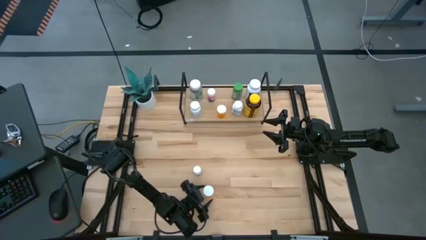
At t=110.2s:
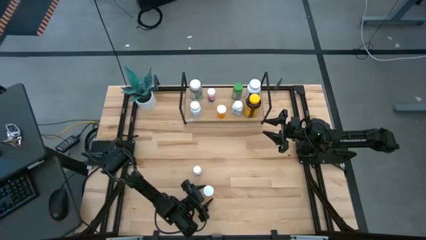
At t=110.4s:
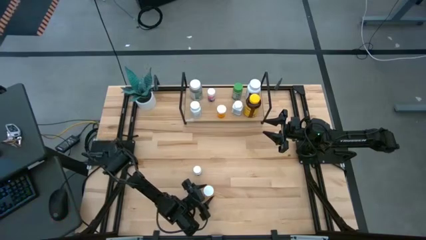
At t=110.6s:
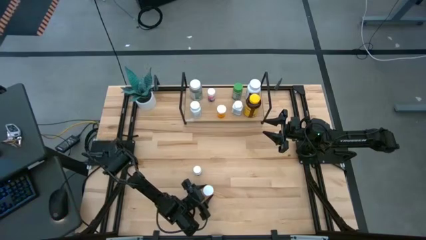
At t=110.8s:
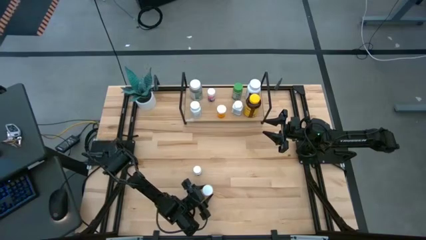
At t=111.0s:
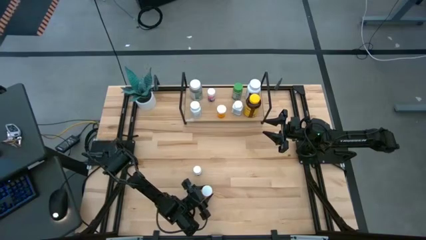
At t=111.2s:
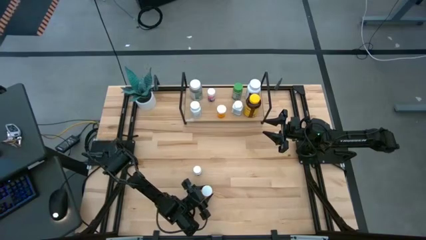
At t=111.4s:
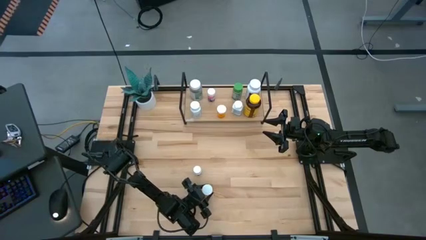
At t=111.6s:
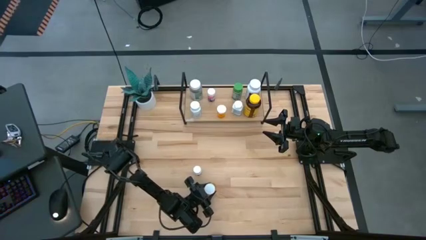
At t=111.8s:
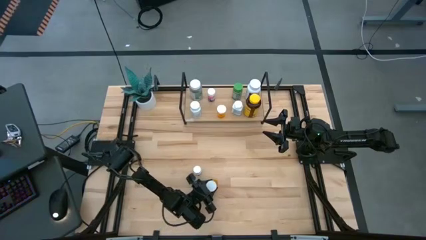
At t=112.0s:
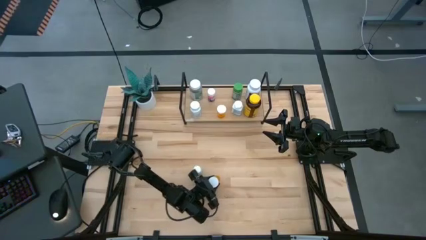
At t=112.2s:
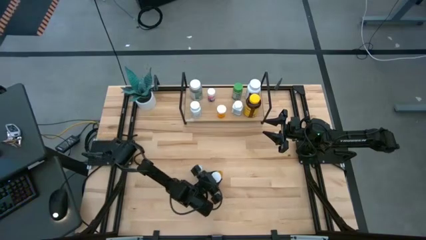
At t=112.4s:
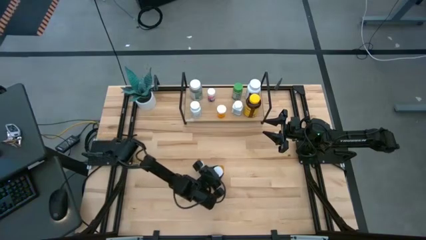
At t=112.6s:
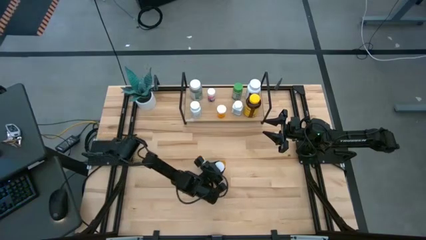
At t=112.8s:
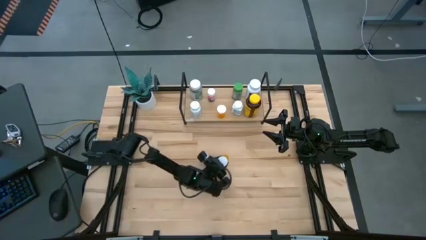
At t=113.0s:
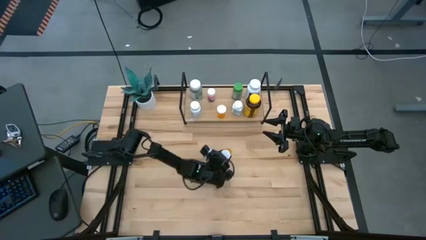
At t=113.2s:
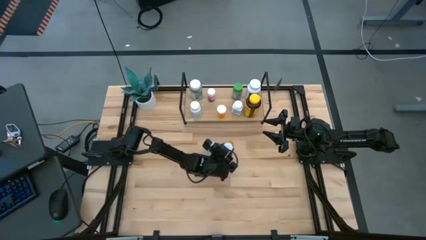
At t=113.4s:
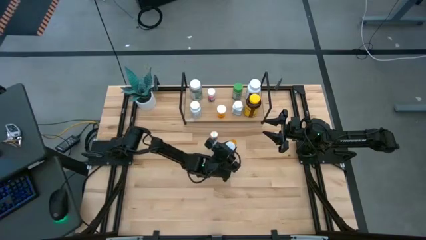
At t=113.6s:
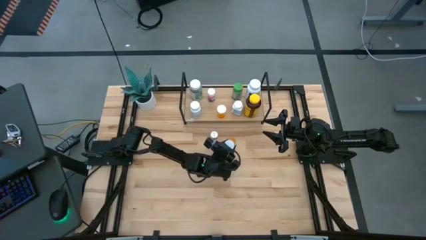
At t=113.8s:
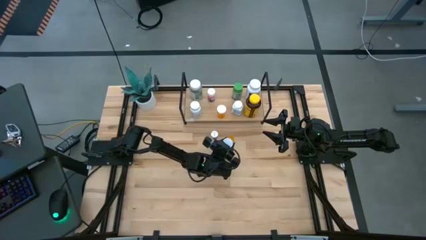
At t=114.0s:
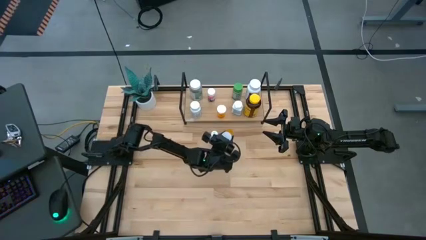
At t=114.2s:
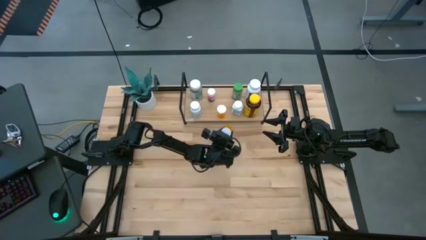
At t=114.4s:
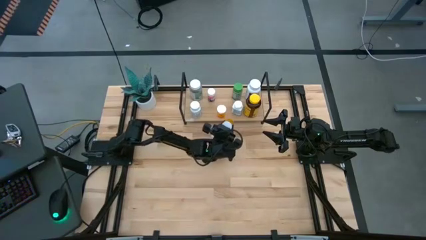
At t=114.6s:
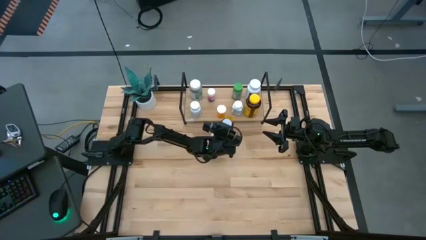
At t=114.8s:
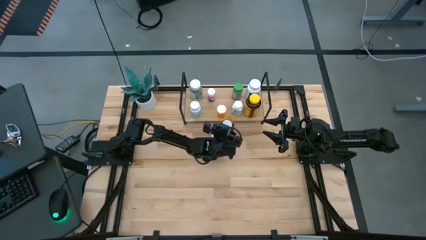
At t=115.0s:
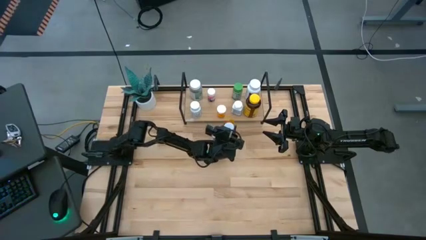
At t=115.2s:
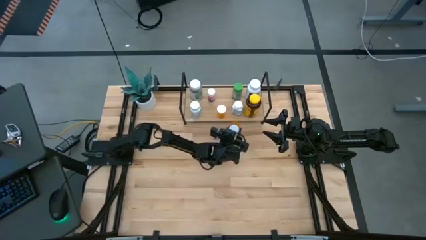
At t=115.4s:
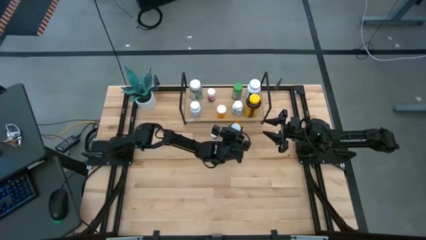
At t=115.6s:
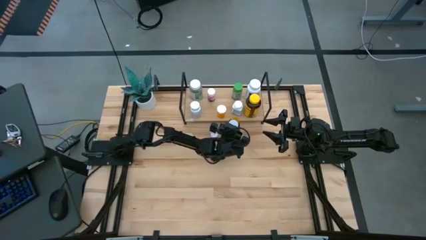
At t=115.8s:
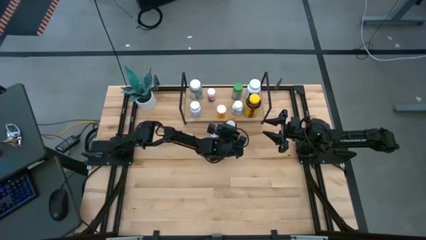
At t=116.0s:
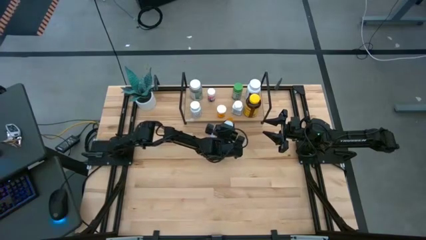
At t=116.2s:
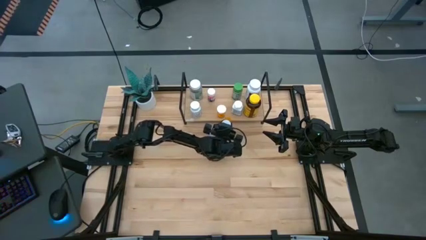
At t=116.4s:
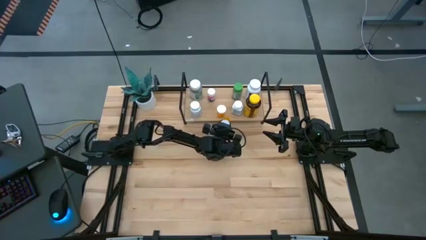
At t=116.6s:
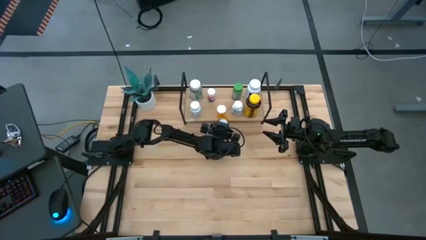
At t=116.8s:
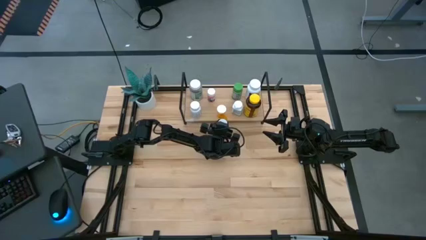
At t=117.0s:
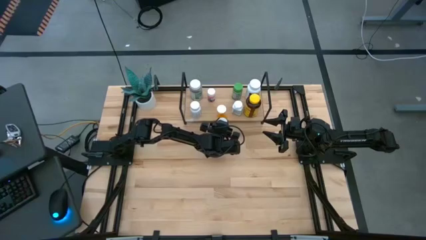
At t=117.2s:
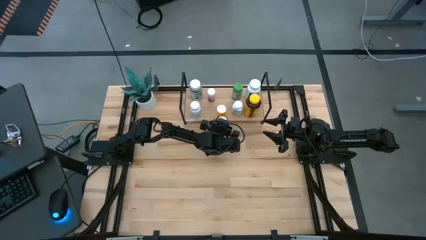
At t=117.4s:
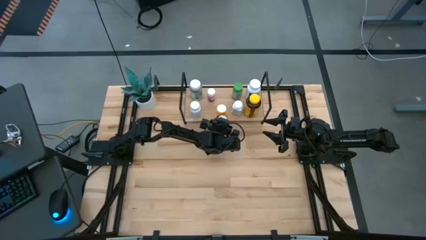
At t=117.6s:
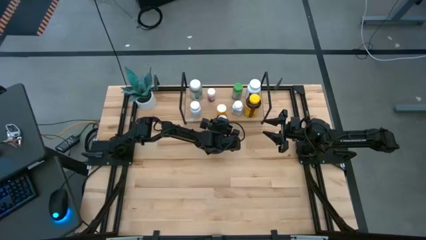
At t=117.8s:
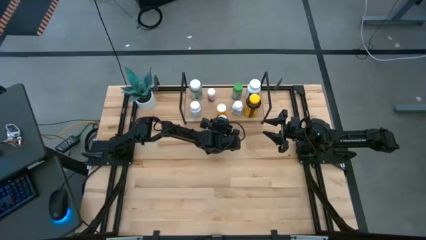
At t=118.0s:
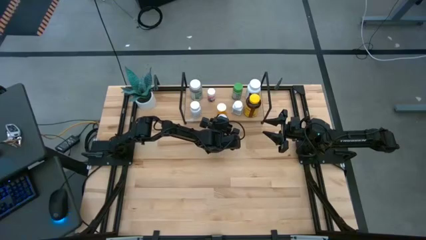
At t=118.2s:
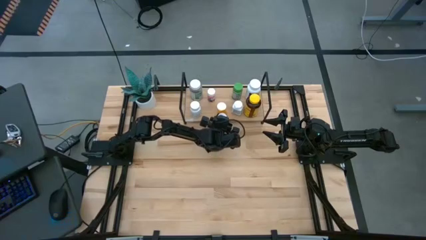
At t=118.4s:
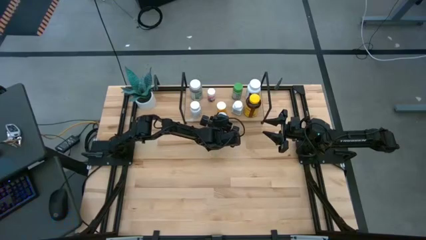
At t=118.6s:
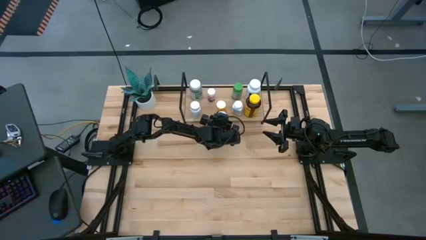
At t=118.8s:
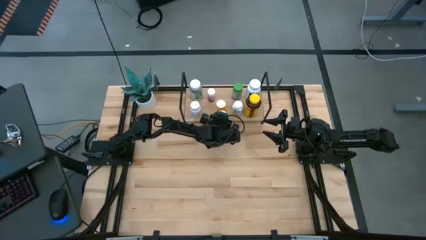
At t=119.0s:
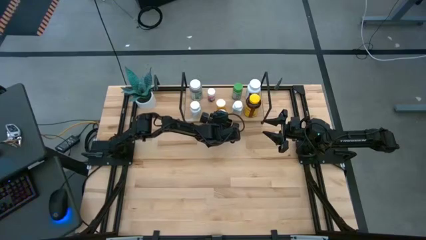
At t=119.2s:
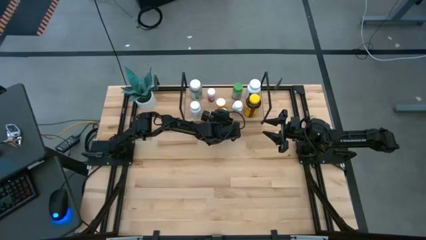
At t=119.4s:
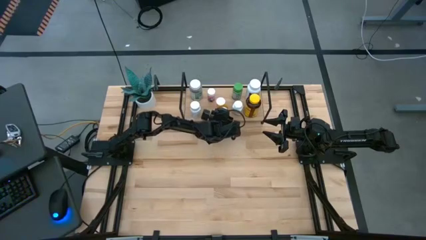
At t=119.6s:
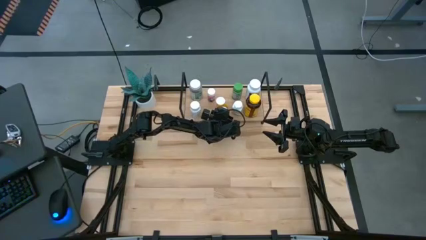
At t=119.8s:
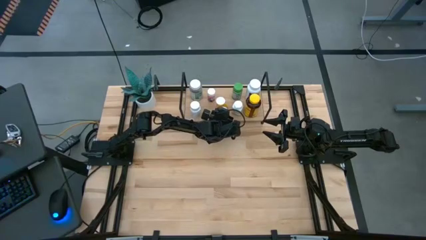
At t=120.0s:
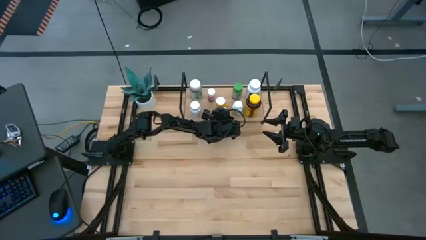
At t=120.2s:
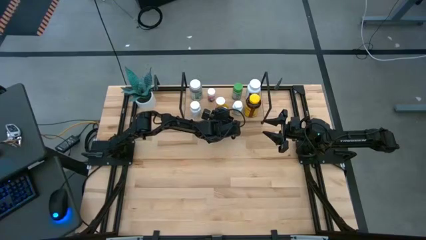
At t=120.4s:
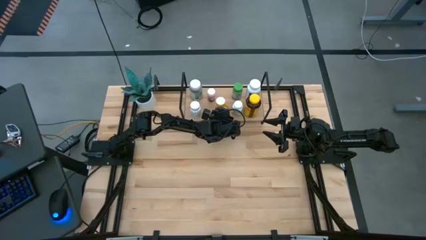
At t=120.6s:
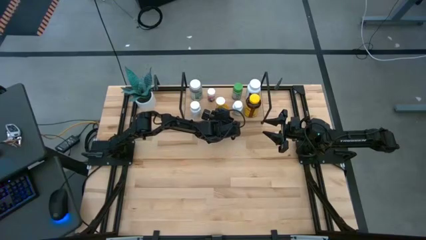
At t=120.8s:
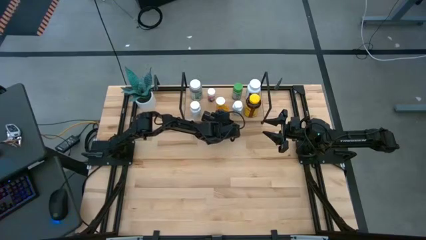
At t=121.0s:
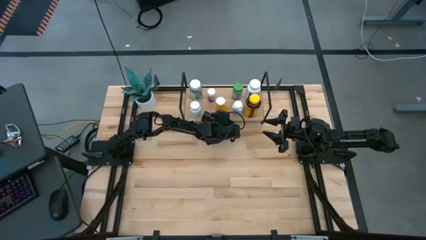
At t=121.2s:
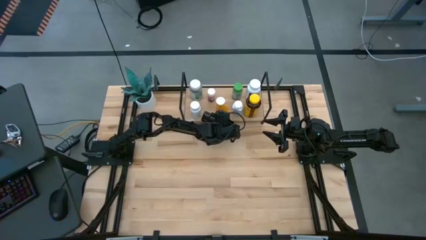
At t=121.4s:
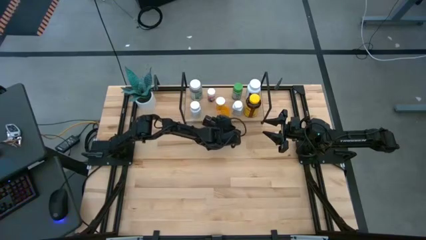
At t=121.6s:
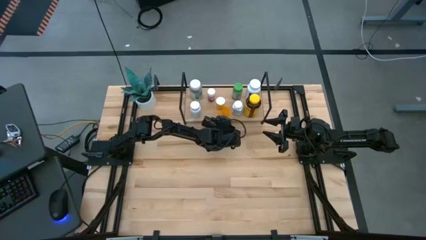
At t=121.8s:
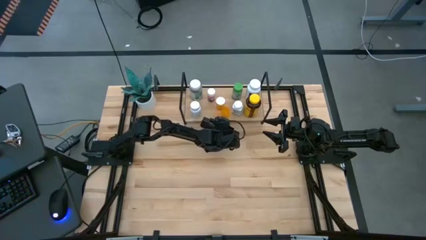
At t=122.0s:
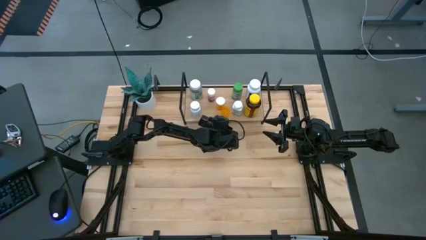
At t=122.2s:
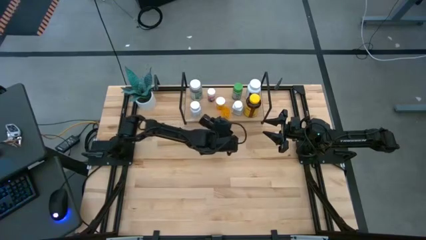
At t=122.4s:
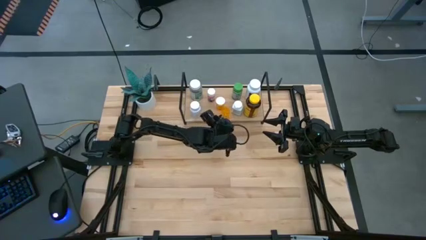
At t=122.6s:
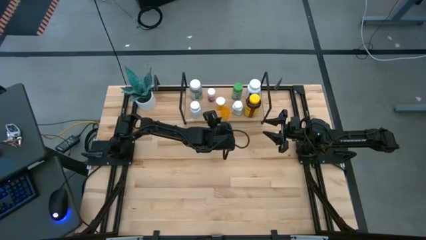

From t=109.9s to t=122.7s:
Task: Pick and place medicine bottles onto shelf by color
Put the orange pill bottle on the shelf aligned with the other orange pill bottle

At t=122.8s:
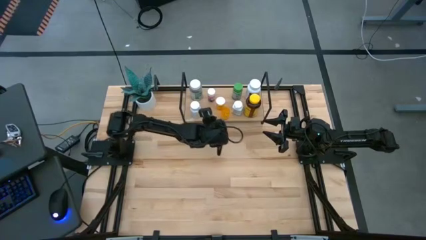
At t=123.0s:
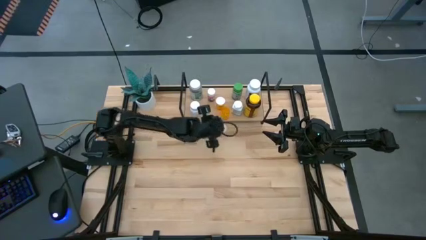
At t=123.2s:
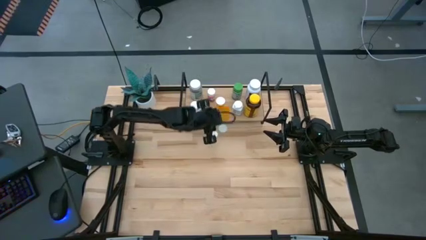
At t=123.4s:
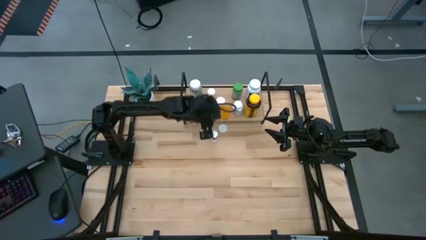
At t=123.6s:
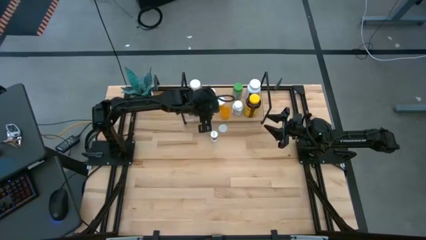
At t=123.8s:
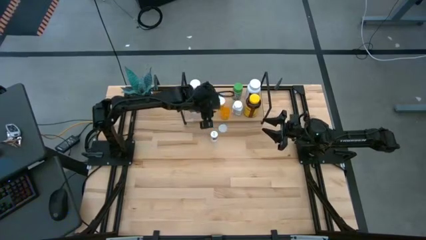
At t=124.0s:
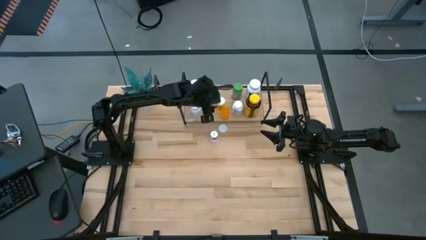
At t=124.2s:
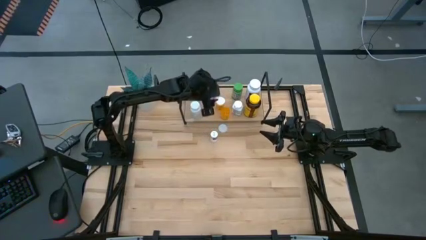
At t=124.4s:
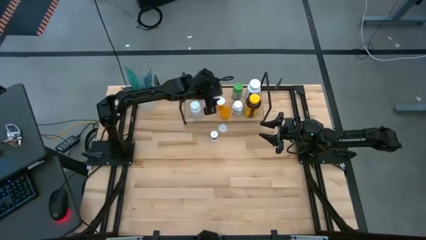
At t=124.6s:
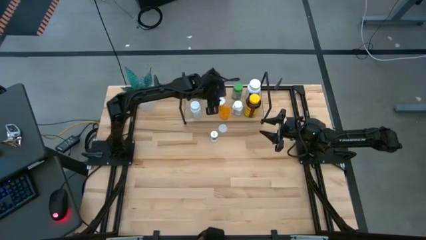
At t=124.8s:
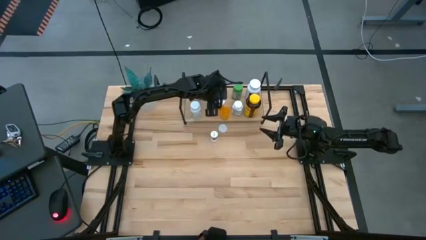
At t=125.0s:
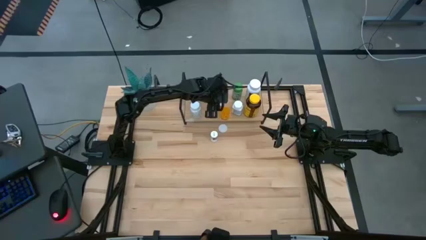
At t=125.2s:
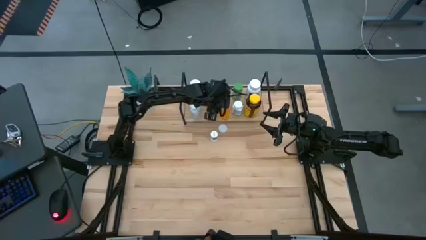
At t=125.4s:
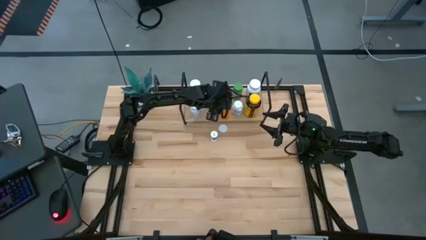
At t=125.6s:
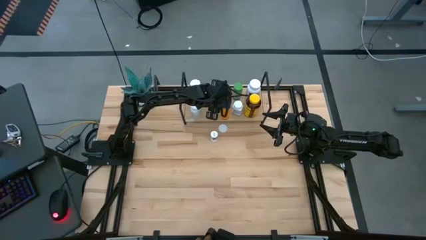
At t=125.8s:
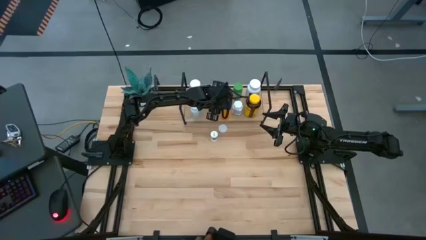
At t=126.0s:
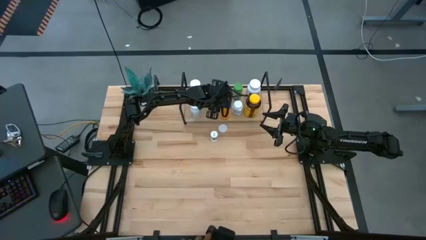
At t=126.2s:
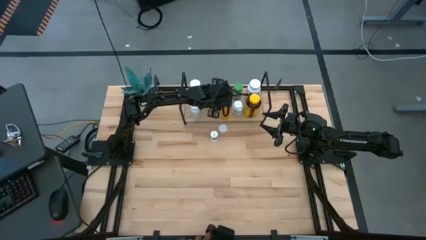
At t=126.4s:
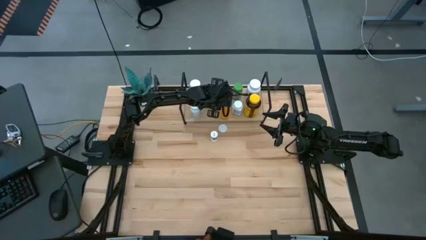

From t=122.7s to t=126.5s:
Adjust the orange pill bottle on the shelf
